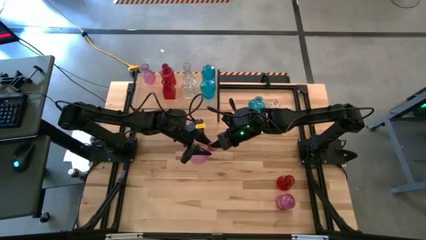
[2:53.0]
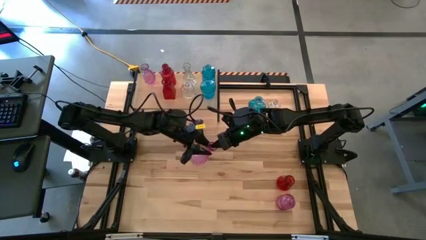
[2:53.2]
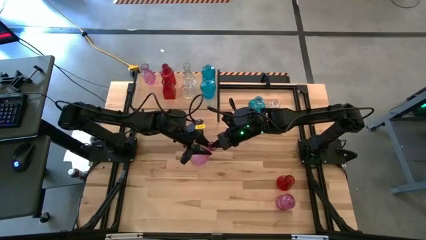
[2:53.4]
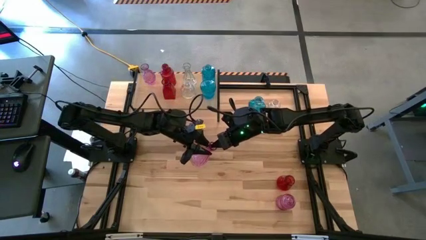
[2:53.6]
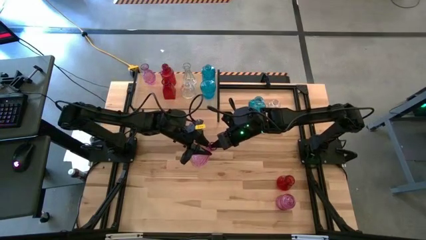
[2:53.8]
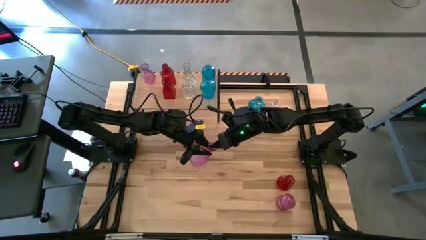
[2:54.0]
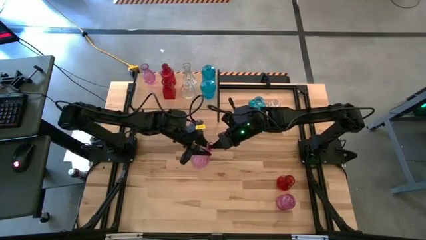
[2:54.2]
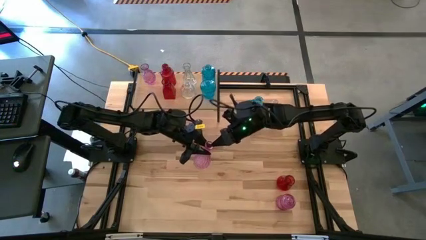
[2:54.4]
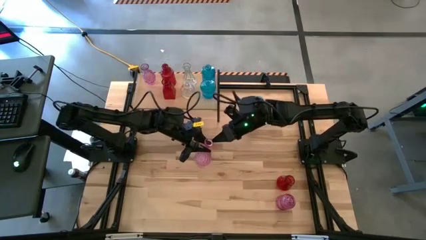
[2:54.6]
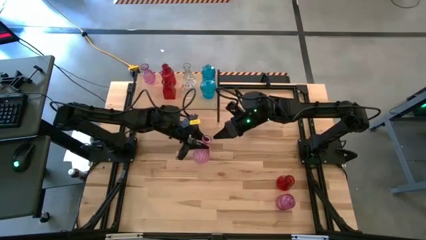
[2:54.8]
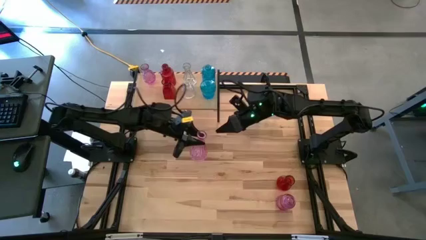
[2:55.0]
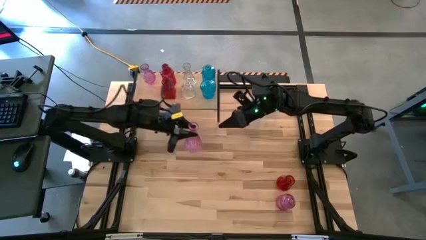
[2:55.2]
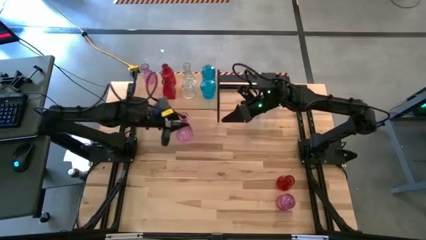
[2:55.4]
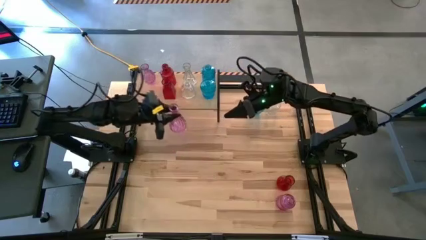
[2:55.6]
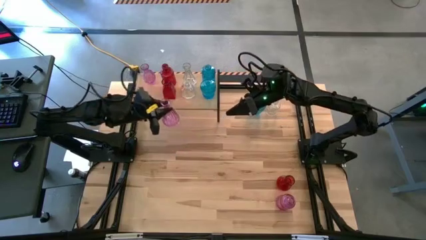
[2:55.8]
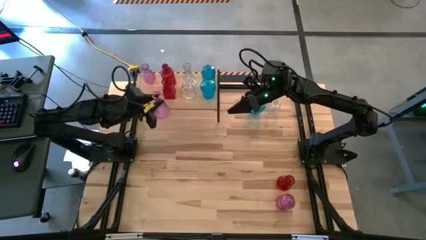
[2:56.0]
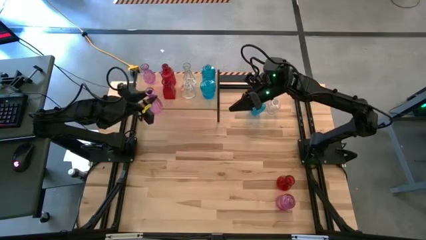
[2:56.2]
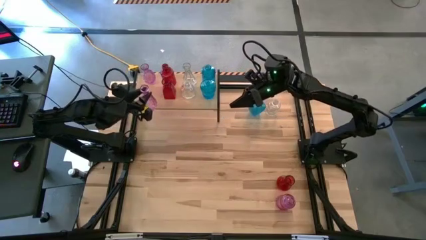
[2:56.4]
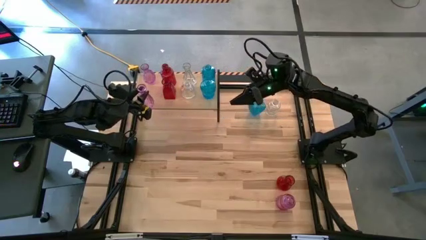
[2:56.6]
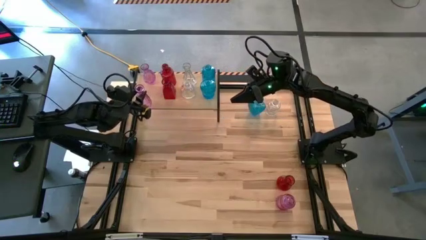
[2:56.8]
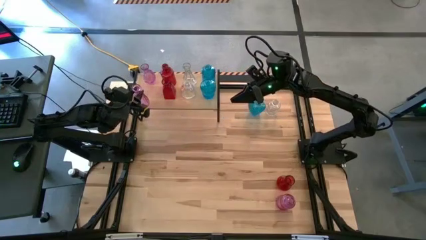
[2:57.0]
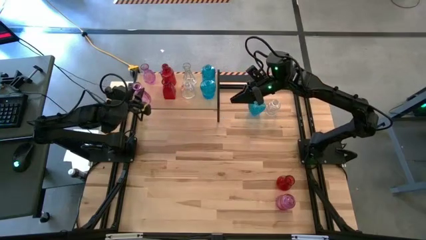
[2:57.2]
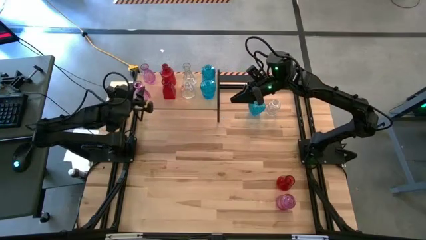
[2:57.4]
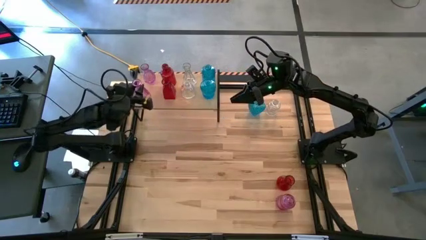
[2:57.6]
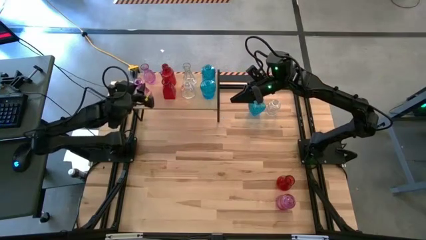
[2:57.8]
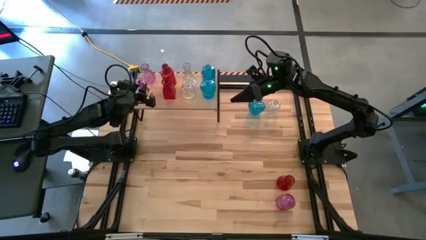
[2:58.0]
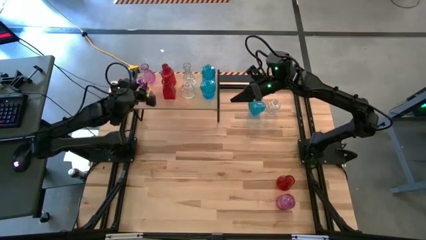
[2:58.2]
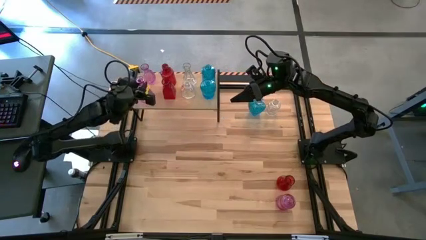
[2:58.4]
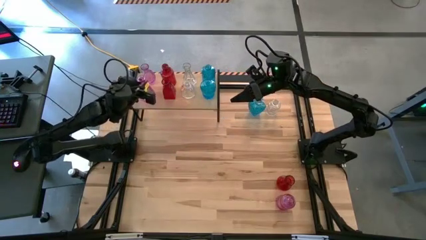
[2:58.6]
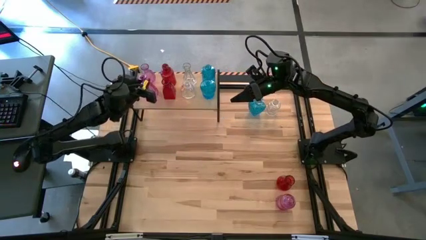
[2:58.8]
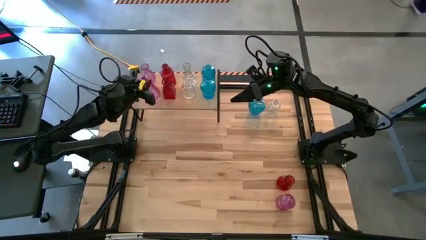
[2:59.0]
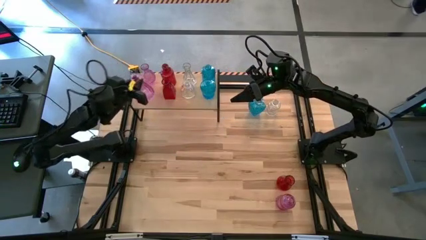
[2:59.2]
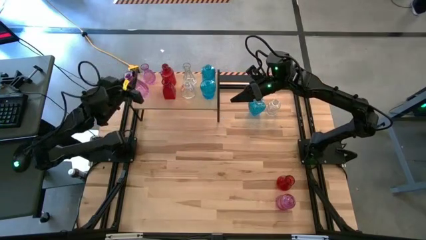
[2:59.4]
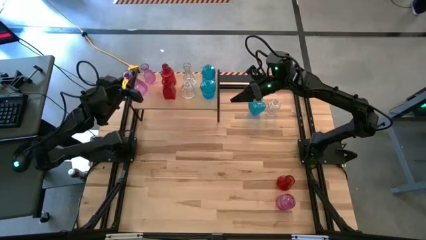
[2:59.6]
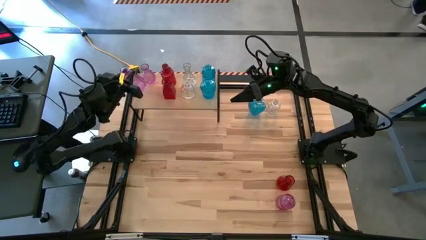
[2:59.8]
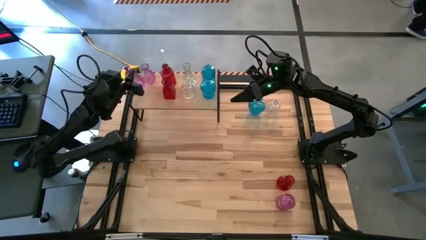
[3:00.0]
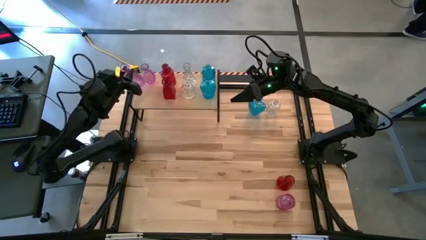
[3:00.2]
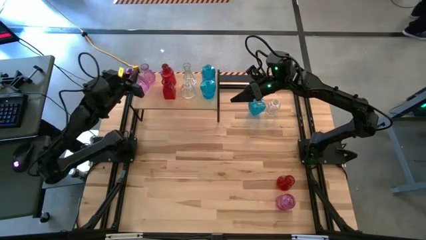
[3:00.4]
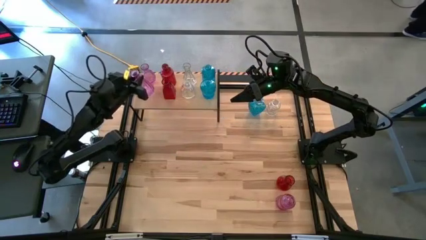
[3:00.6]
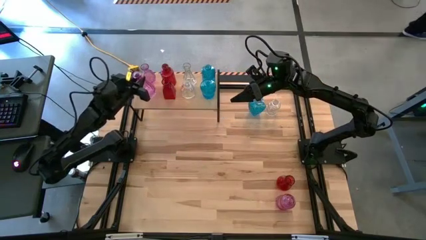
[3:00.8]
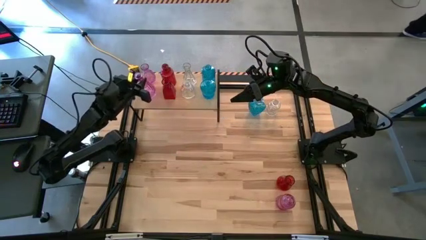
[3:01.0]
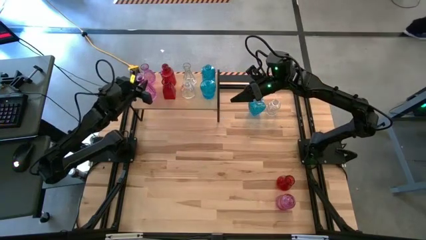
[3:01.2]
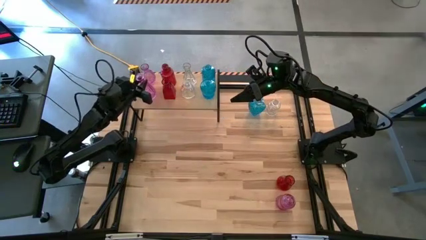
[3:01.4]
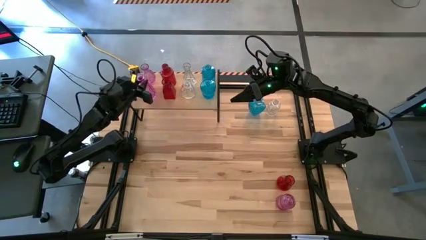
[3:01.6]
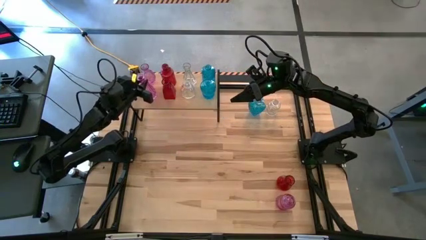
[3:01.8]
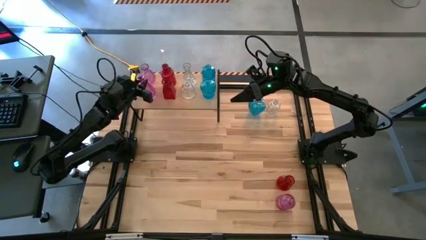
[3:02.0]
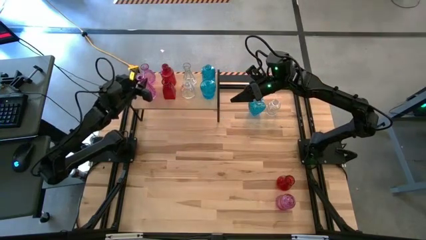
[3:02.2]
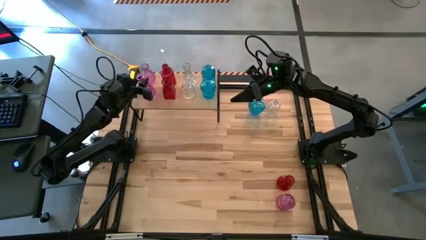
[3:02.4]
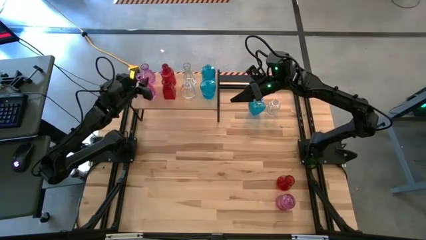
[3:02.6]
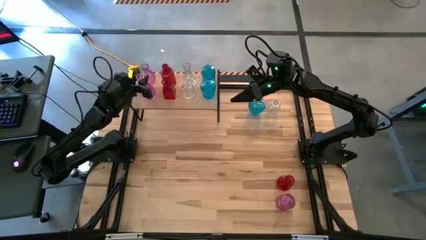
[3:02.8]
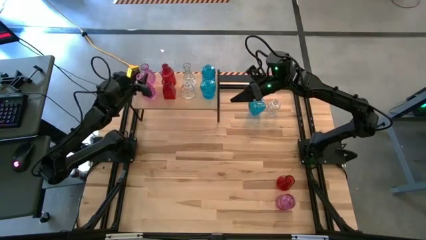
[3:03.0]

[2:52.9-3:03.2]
Task: sort vases onto shelf
Put the top purple vase on the shelf aligned with the other purple vase

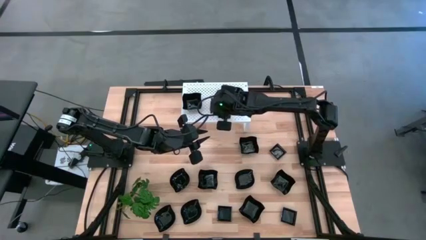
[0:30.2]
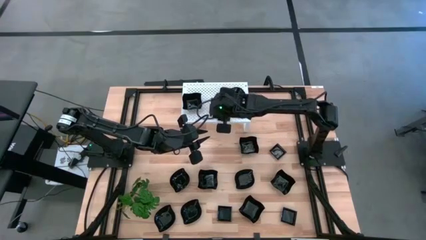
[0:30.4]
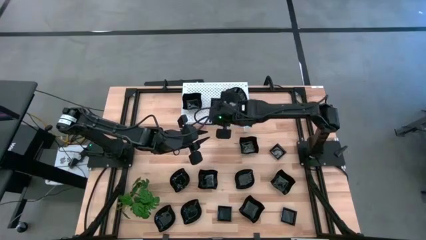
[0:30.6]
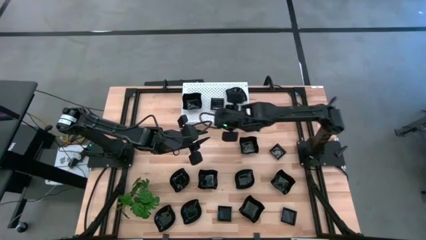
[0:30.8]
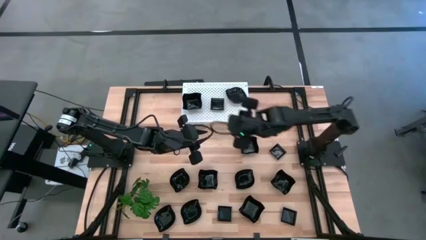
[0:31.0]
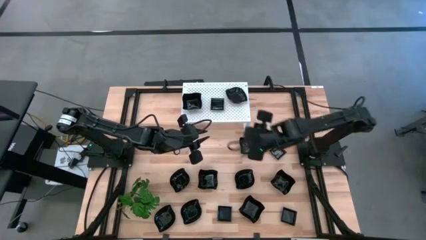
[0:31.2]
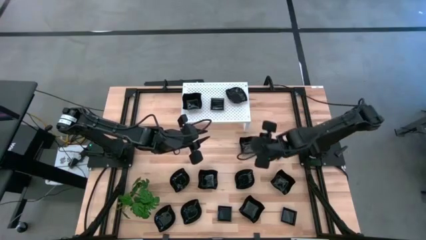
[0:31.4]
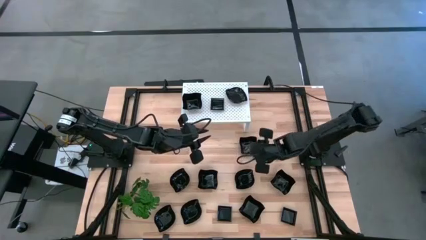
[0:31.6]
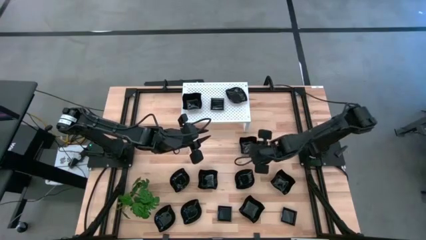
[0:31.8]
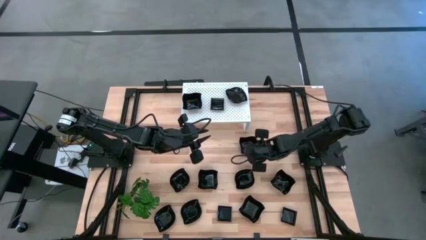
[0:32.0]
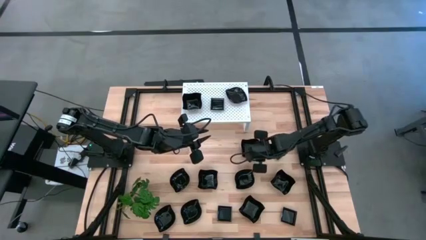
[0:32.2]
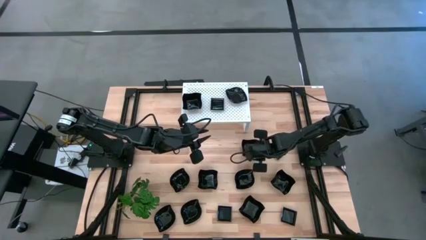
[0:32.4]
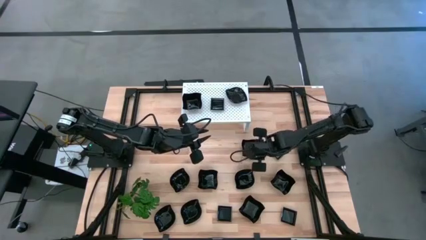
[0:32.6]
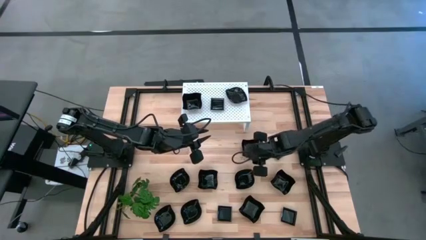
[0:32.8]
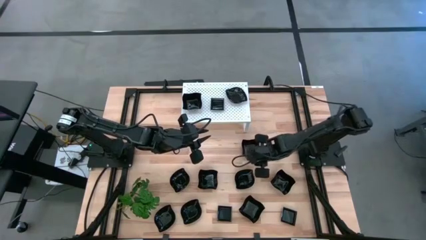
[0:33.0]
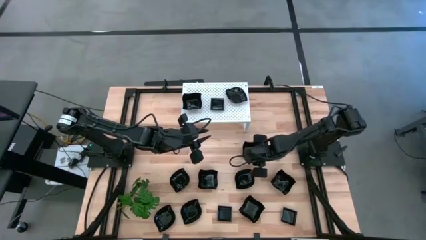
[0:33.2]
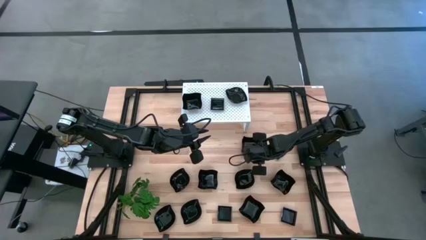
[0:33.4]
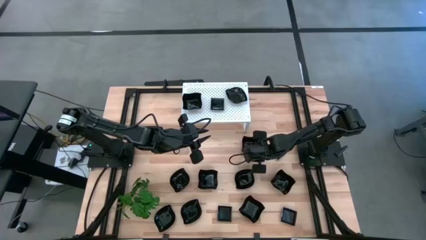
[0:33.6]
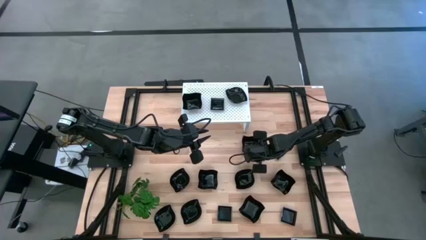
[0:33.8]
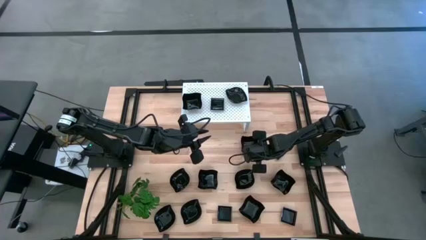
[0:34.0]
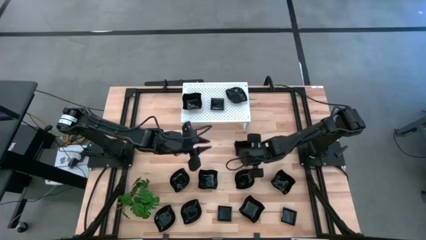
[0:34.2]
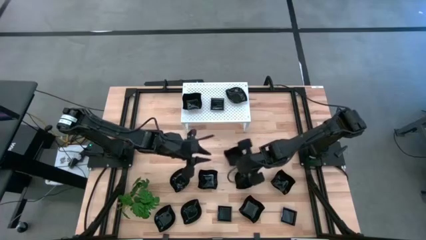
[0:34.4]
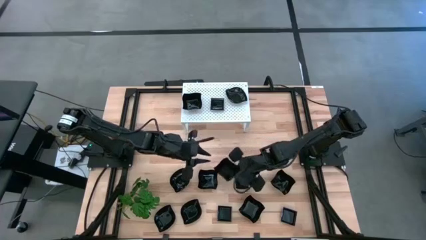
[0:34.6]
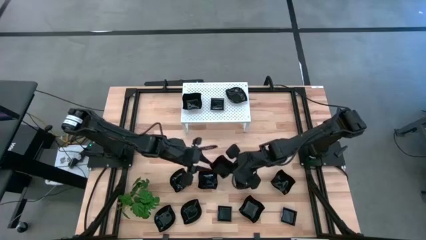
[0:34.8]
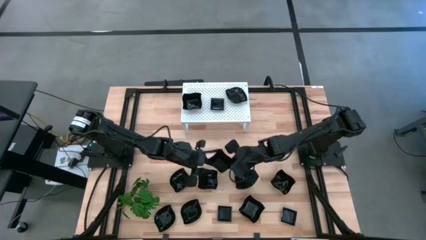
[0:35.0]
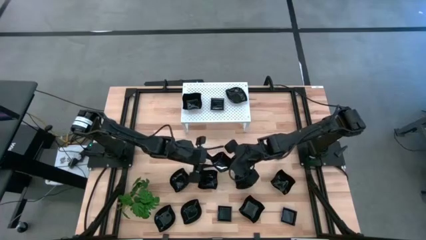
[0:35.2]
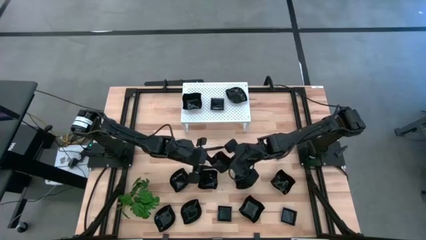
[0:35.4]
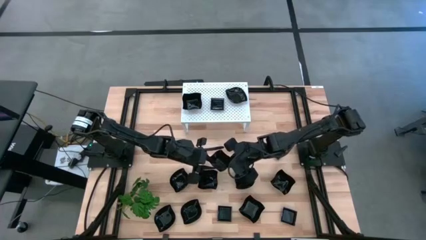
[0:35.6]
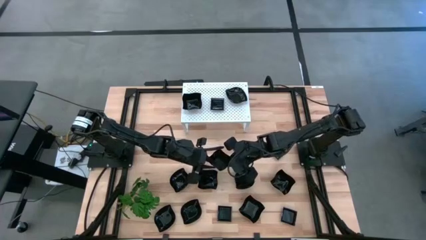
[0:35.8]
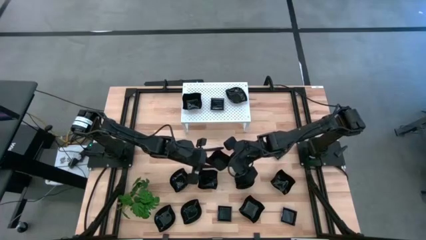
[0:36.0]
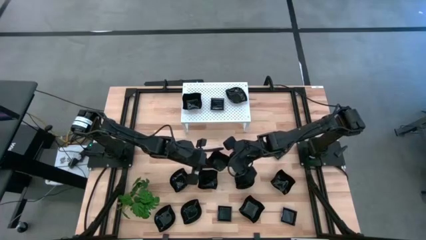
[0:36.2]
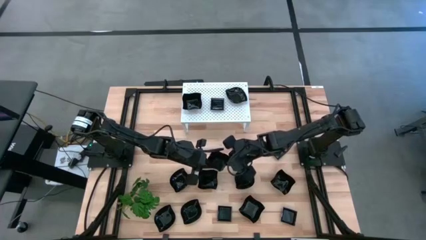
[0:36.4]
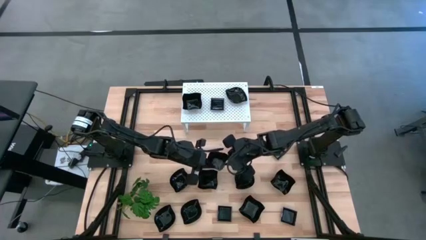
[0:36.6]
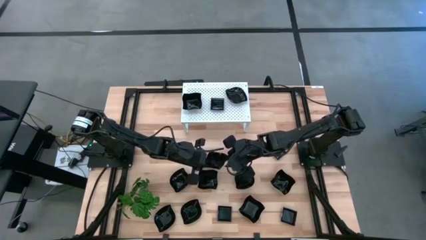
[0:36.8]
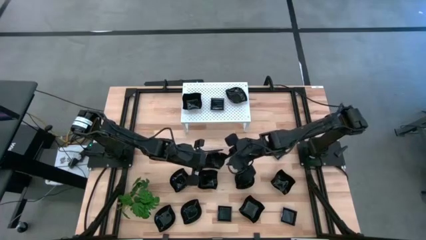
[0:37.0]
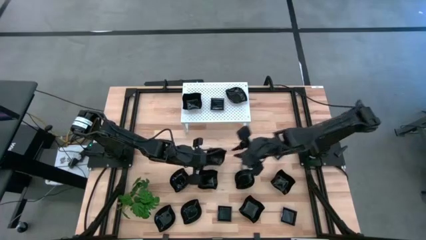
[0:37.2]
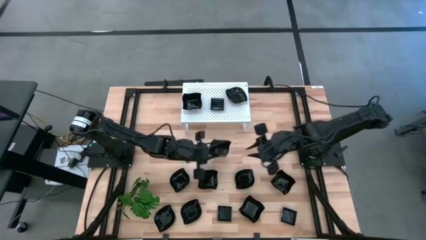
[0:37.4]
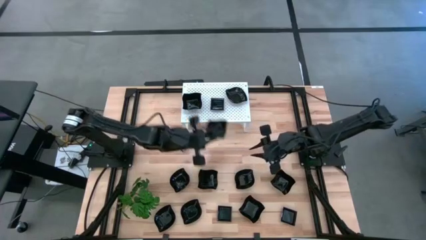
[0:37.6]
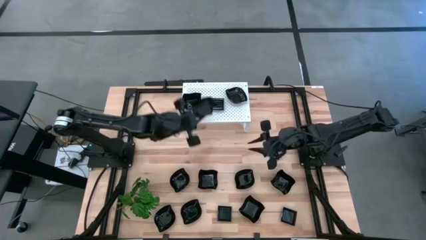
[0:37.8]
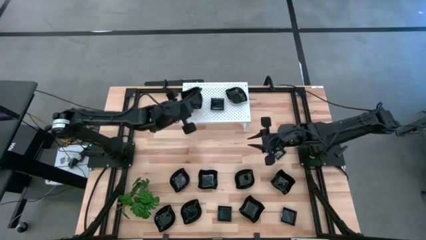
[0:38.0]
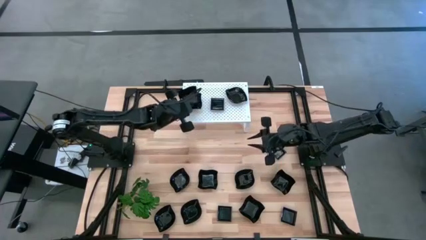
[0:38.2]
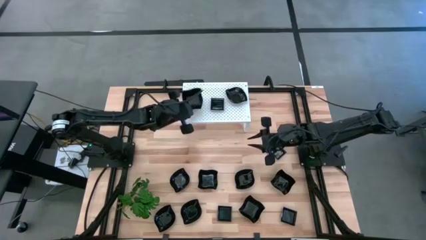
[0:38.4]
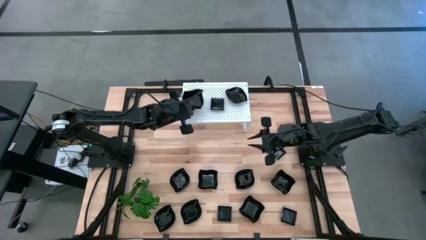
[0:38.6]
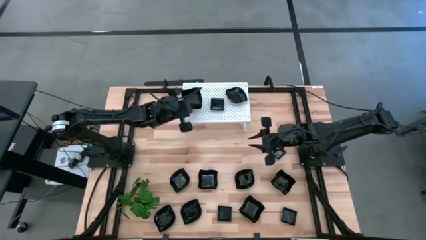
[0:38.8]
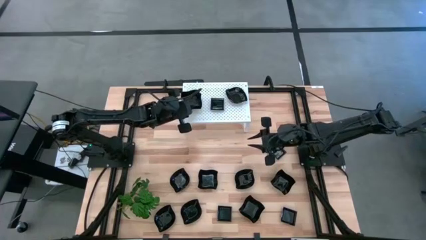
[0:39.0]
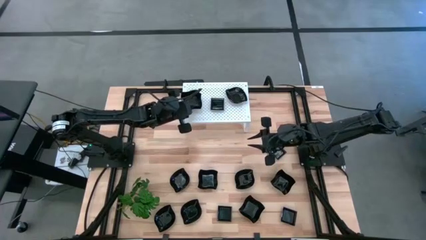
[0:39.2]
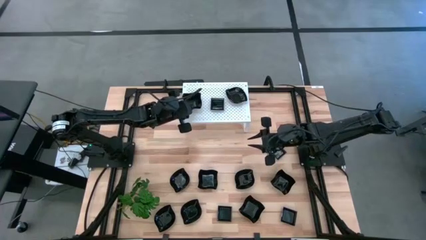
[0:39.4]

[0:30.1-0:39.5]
Task: Pick & Place Mini shaped plates
Stack the distorted square plate on top of the other distorted square plate on the shelf
